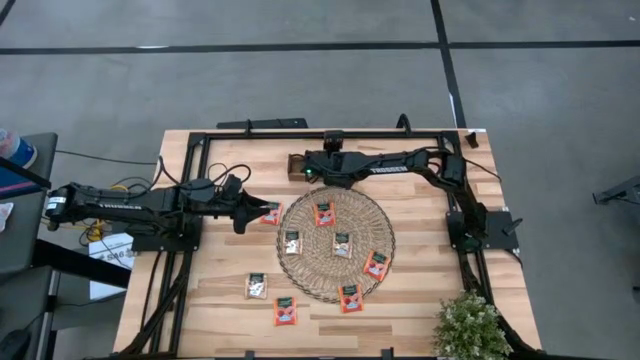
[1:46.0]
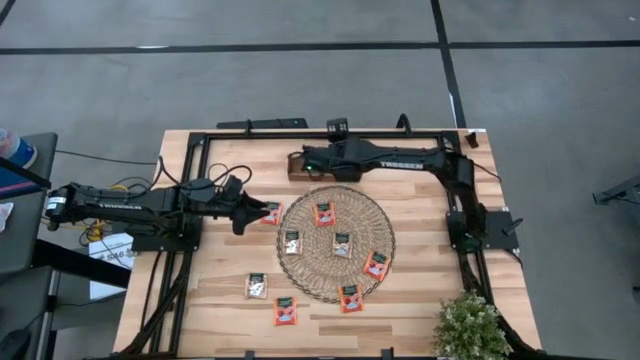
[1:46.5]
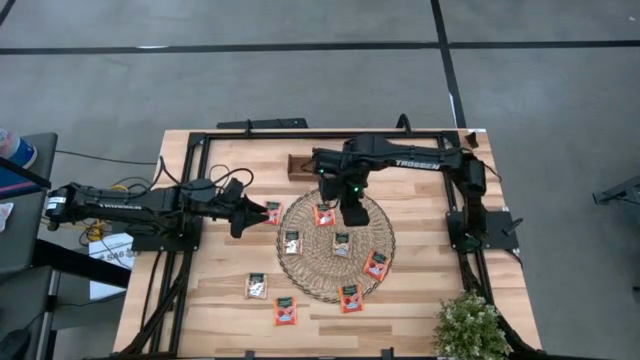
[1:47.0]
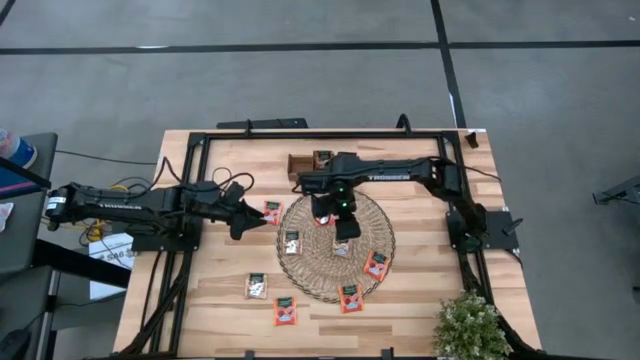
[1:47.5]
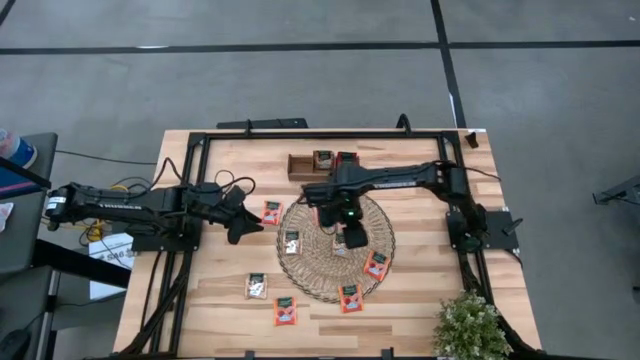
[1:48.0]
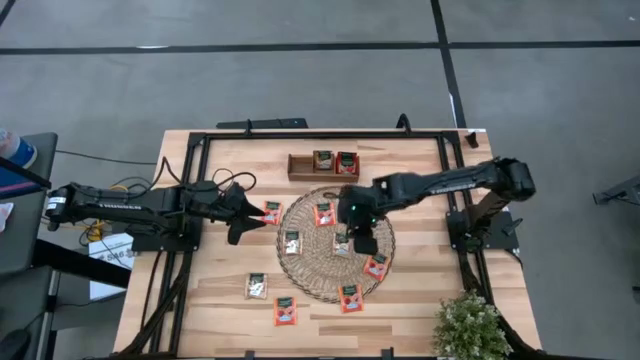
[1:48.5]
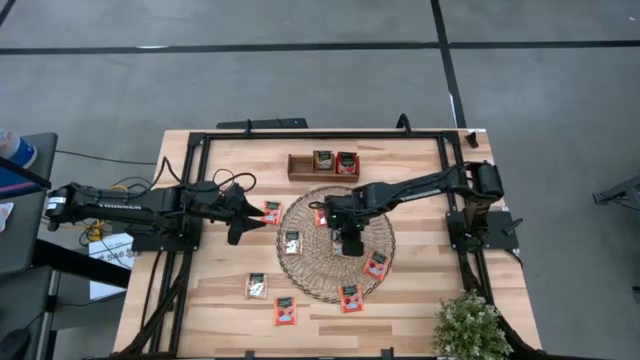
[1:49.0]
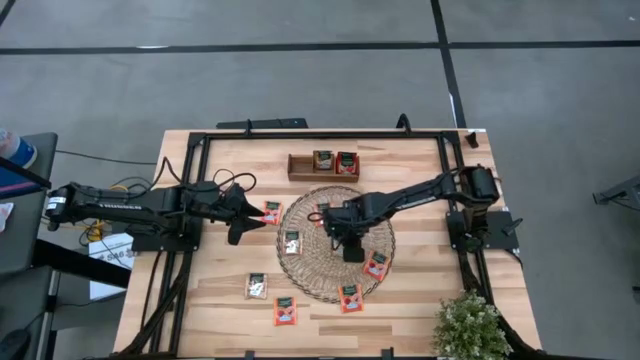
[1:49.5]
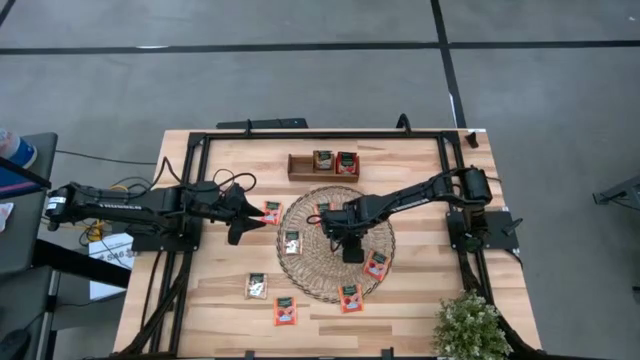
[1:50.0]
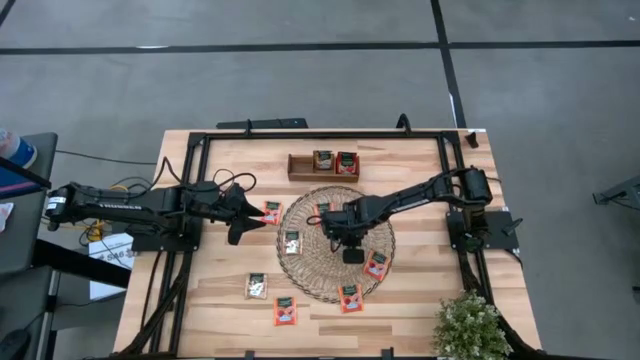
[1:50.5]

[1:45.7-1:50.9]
Task: Pick & Place Tea
Put the brown tea bag into the middle section of the brown wooden organizer

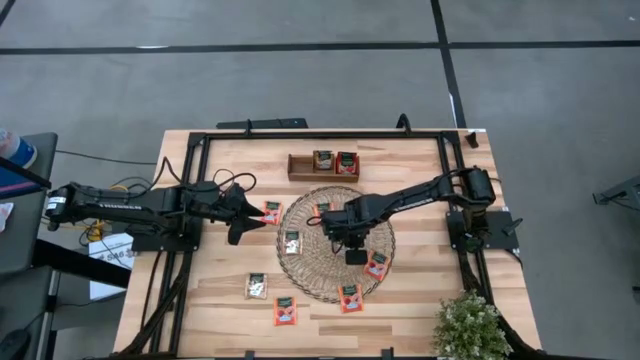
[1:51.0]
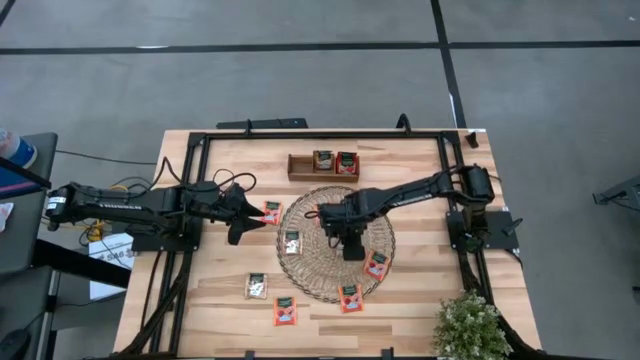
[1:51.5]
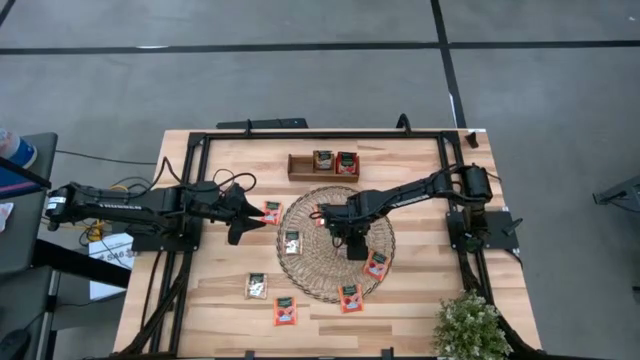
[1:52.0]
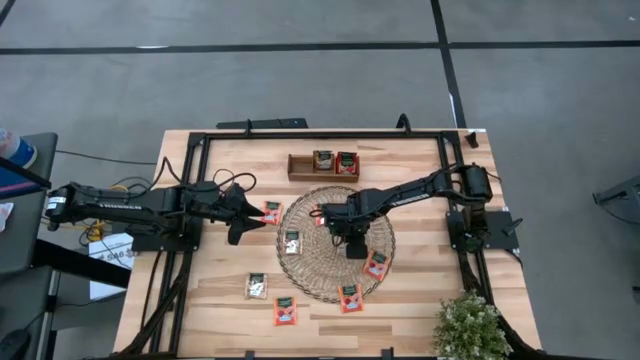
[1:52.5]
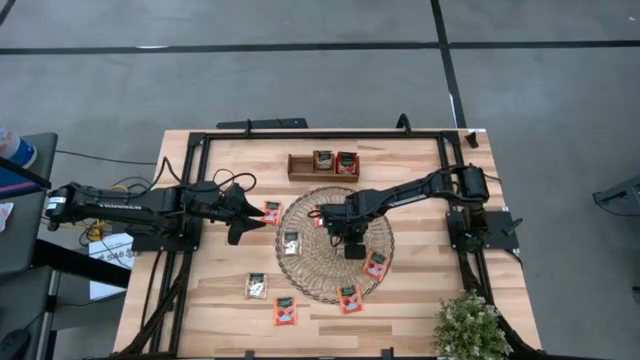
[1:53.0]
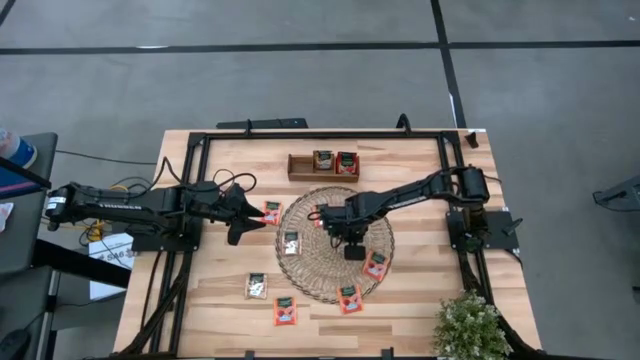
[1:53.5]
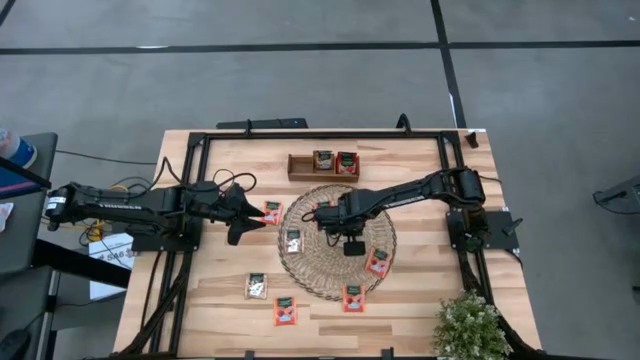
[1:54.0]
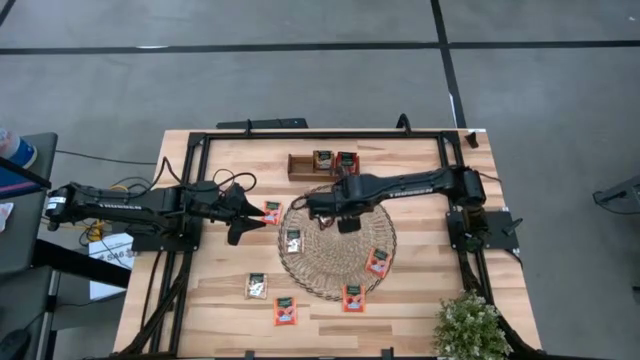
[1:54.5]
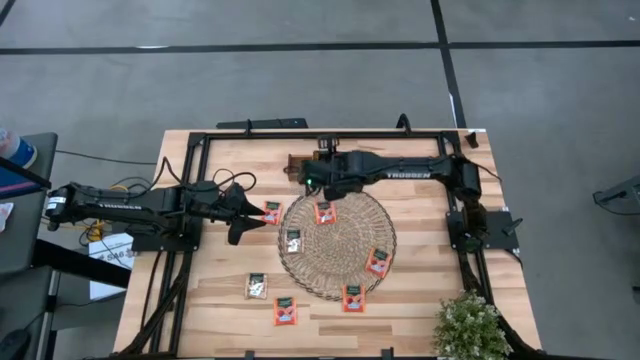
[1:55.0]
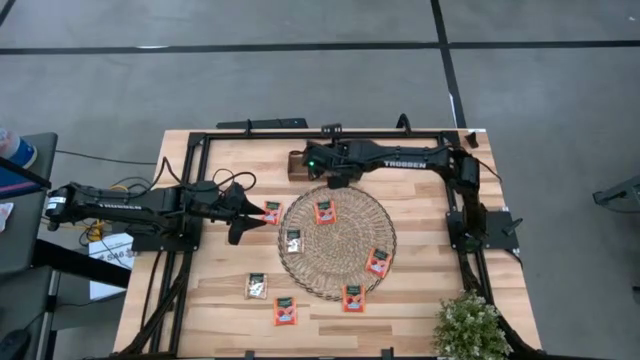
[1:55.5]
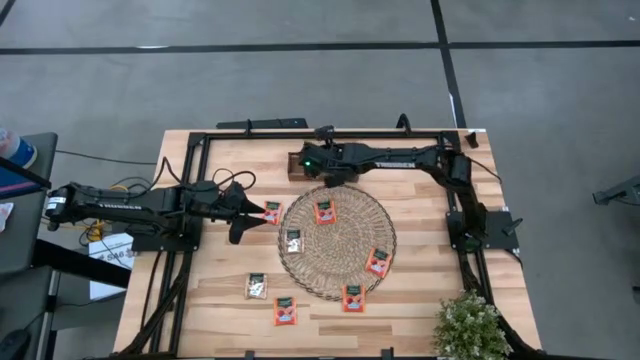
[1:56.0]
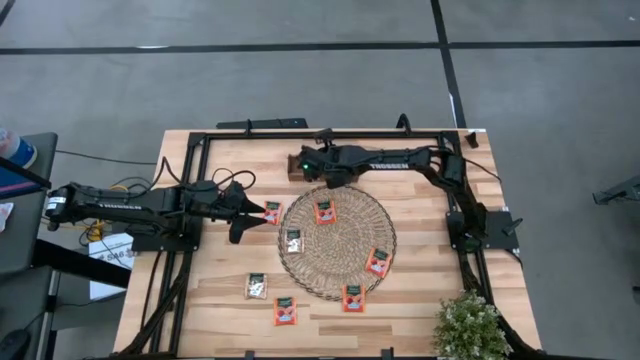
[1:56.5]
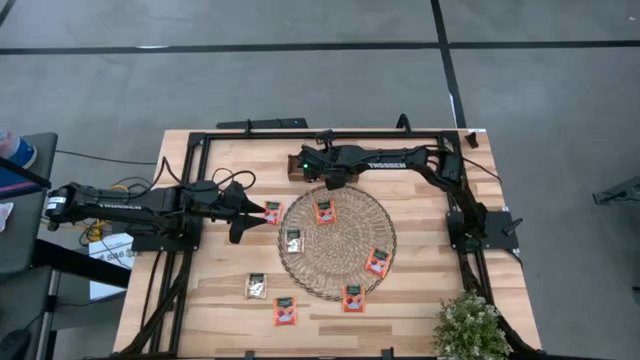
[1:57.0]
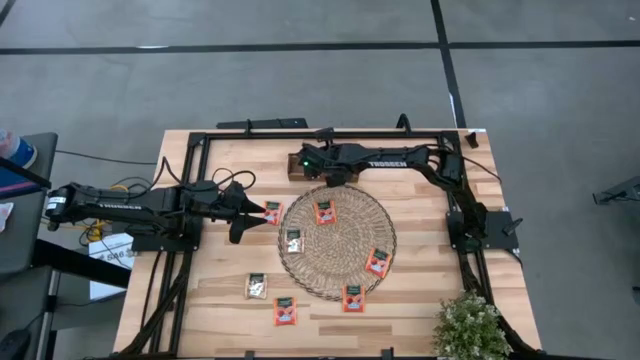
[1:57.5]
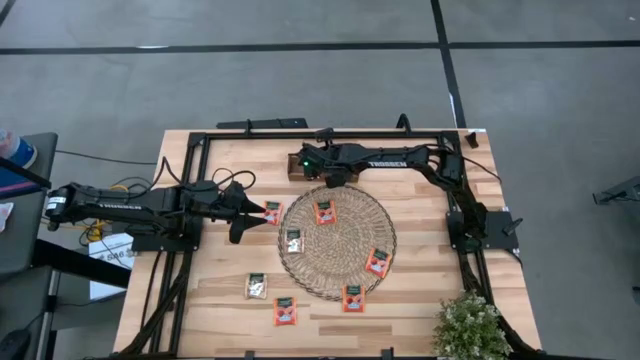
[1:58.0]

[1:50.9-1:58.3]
Put the brown tea bag into the middle section of the brown wooden organizer

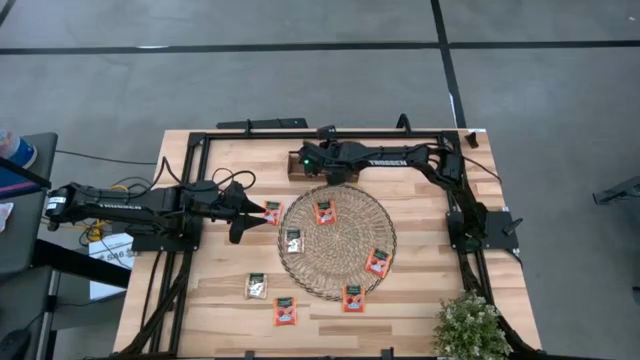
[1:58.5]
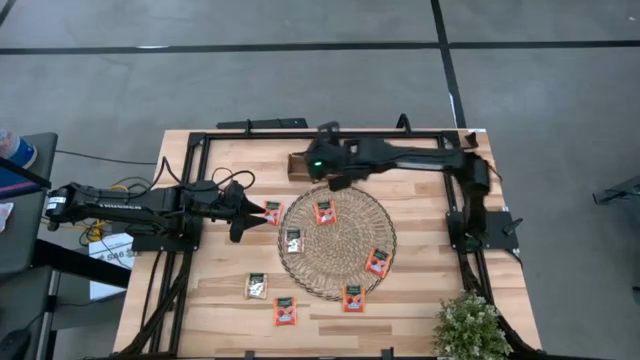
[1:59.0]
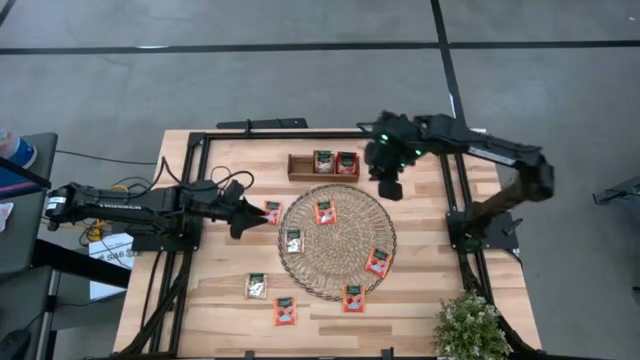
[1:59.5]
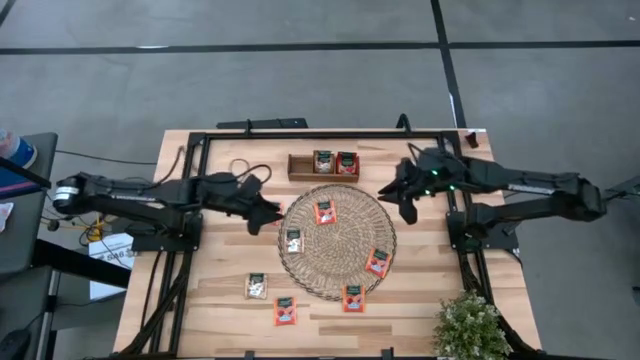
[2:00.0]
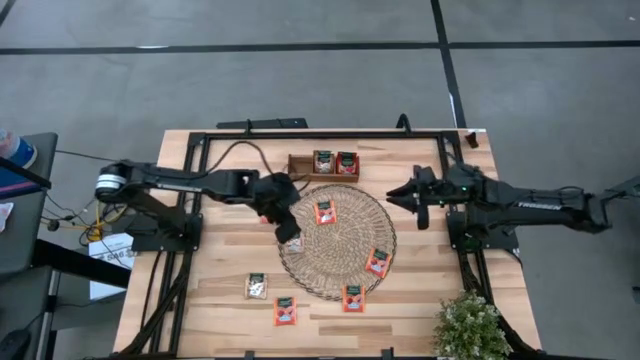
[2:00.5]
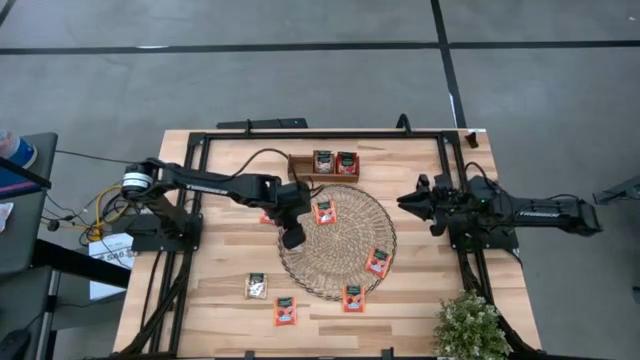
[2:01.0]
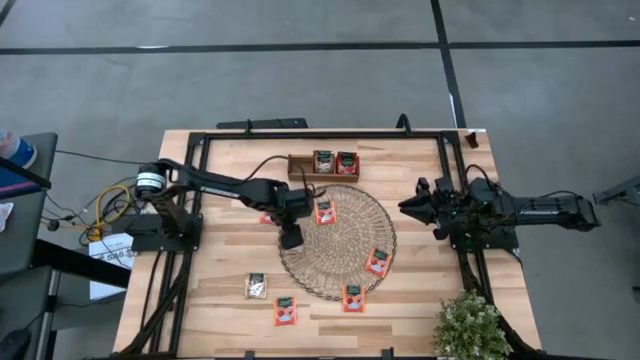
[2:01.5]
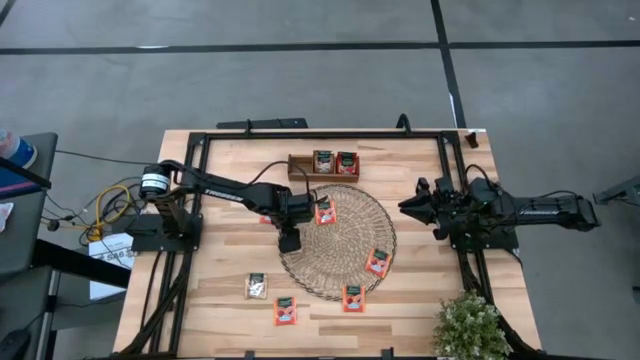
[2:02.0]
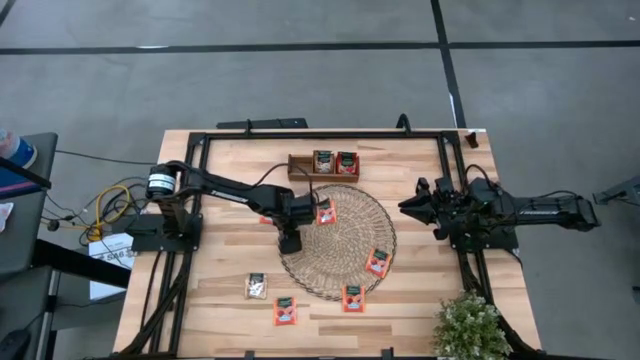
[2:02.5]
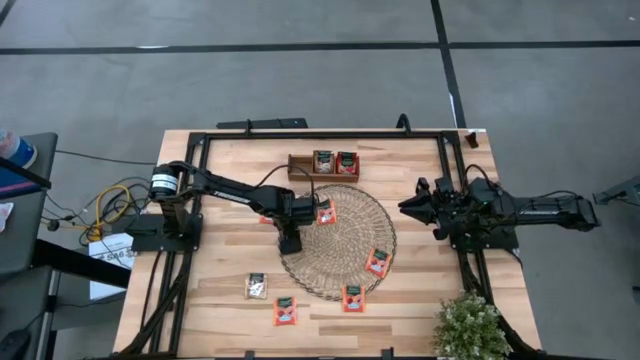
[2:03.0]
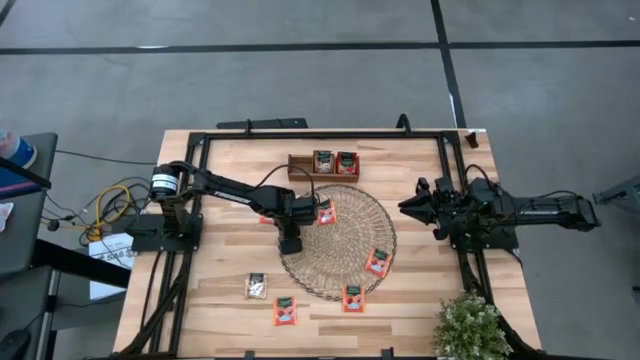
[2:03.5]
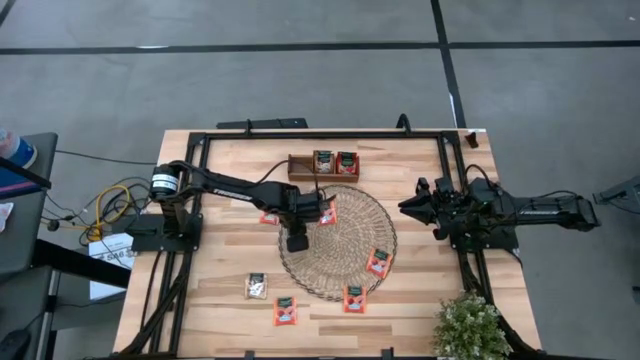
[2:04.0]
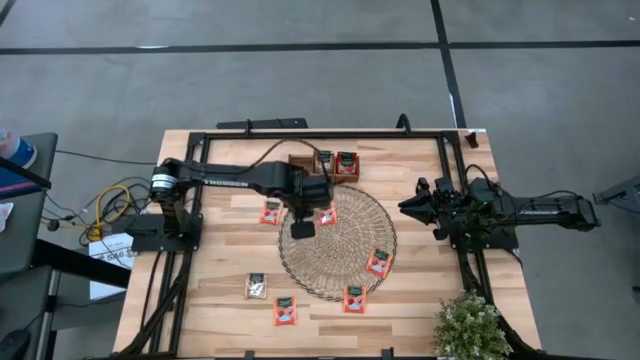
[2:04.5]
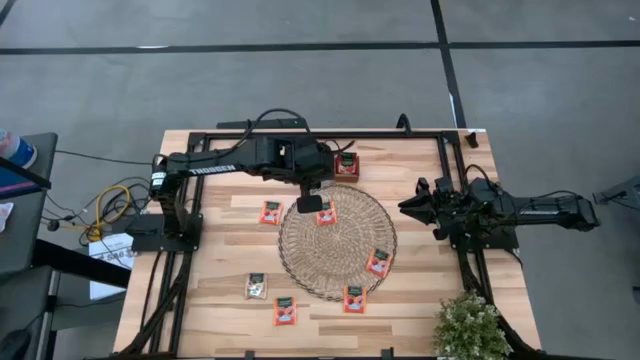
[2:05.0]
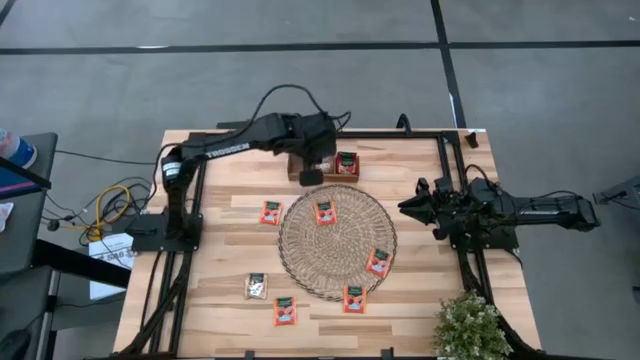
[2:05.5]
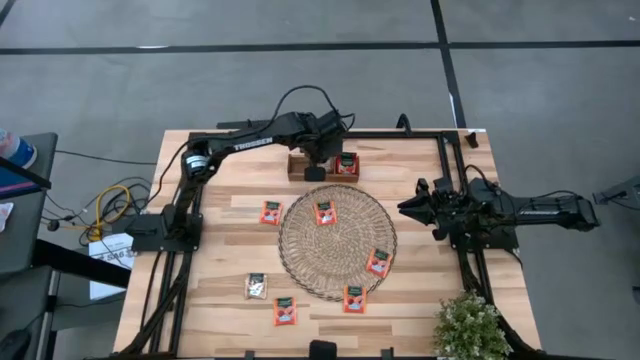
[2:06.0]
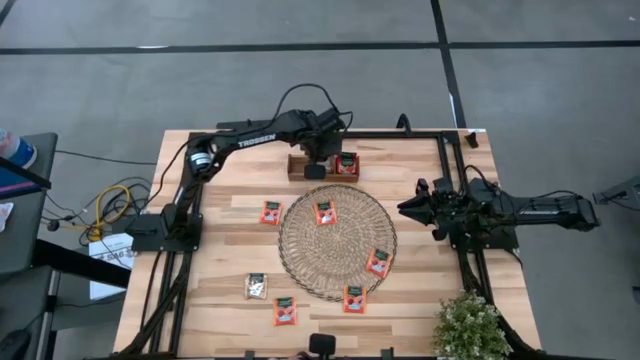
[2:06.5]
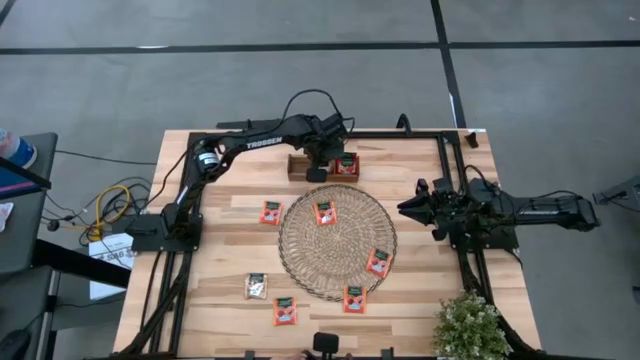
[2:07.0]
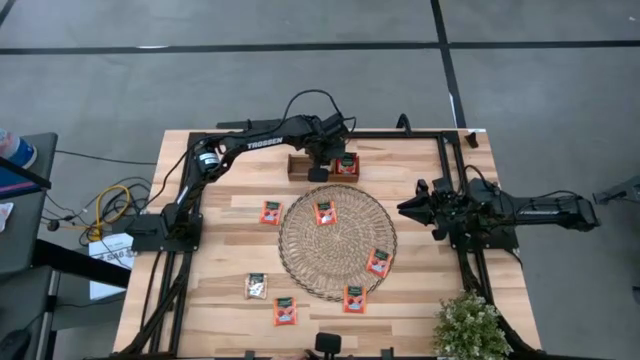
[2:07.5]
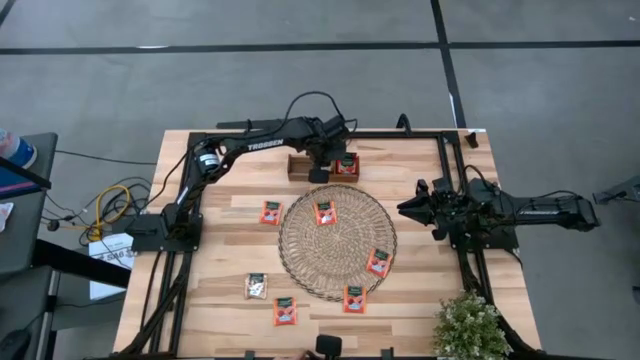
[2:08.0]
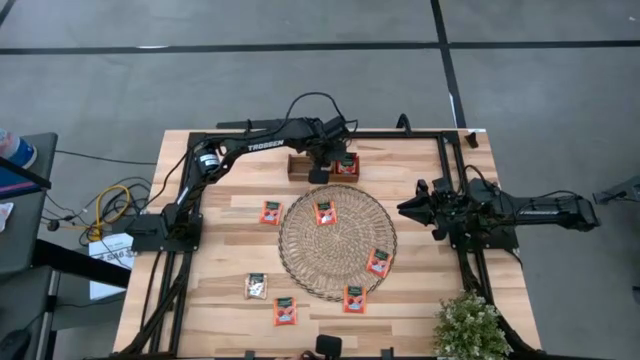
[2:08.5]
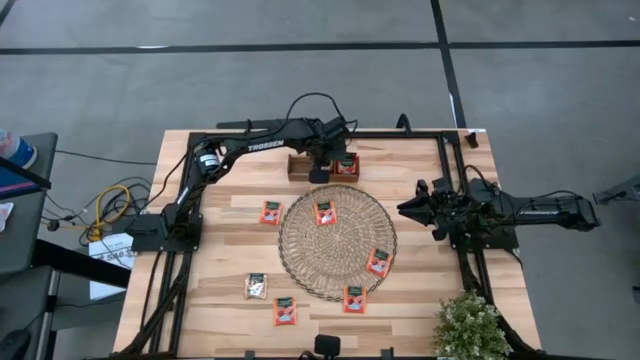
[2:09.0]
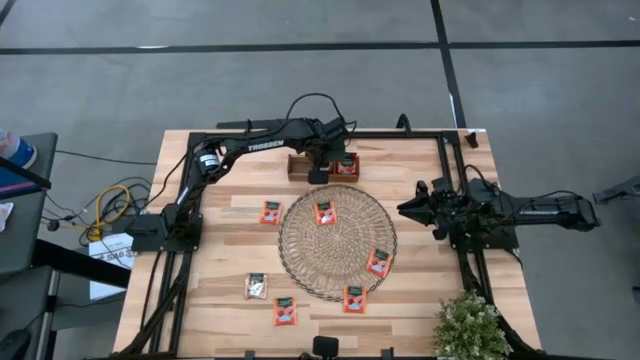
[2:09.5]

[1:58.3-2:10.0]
Put the brown tea bag into the middle section of the brown wooden organizer
